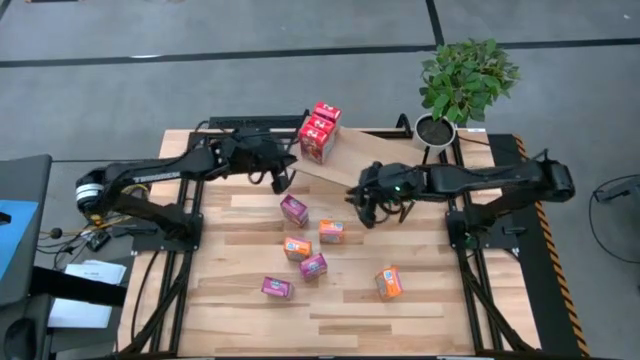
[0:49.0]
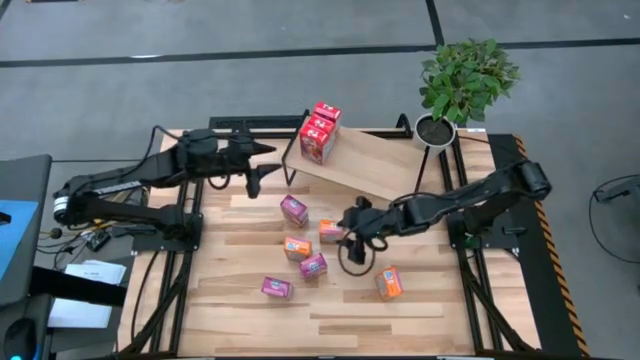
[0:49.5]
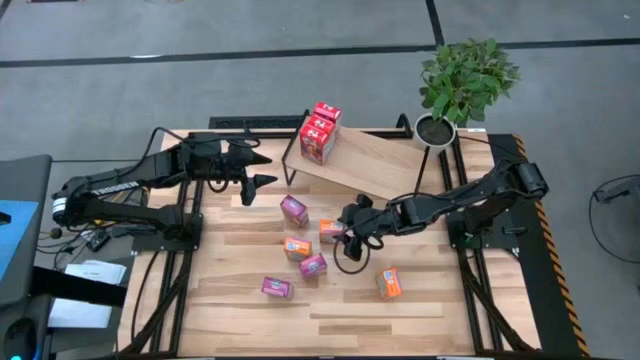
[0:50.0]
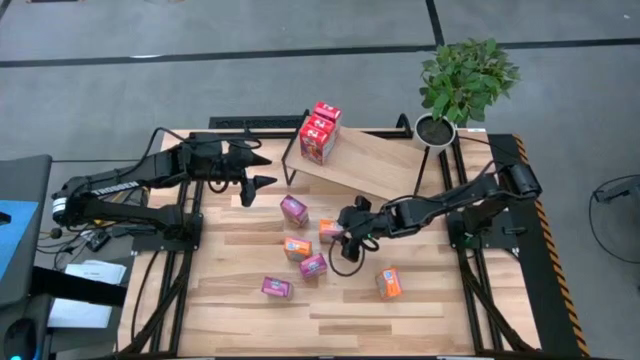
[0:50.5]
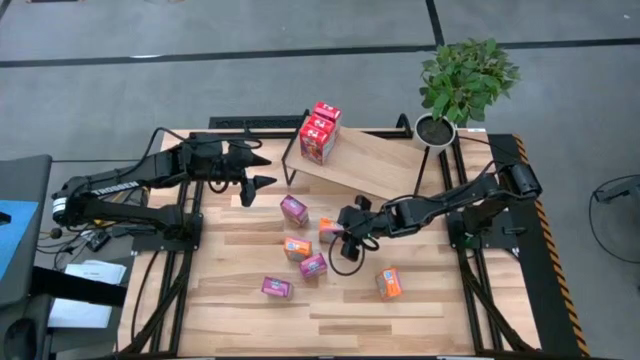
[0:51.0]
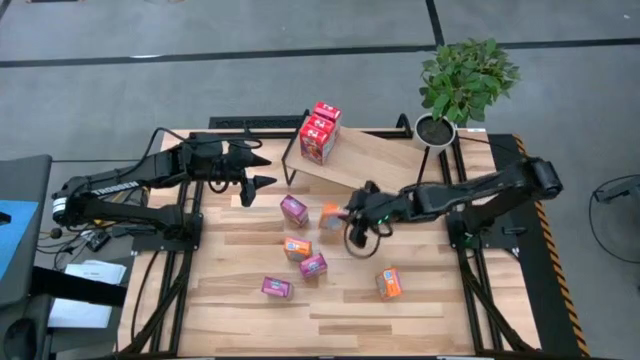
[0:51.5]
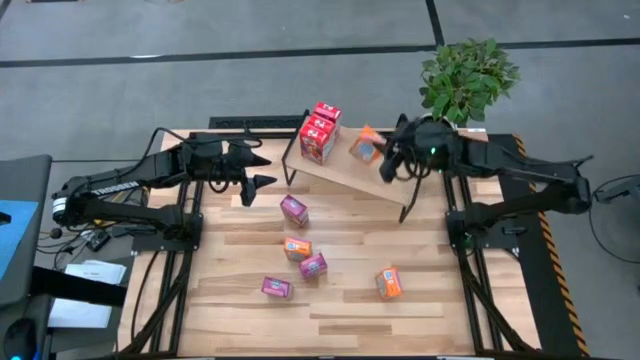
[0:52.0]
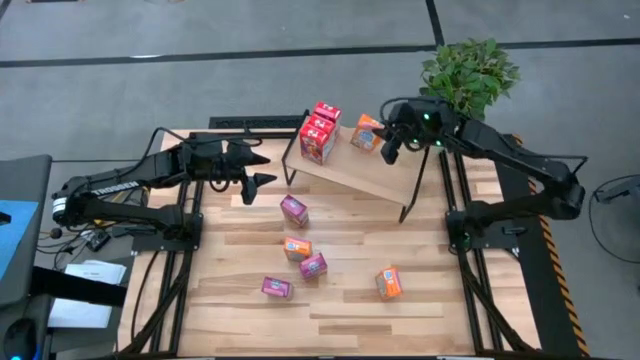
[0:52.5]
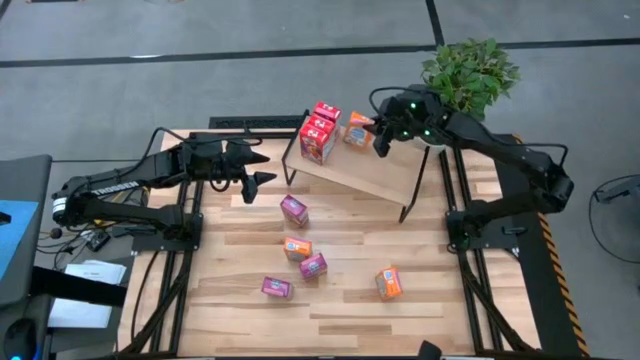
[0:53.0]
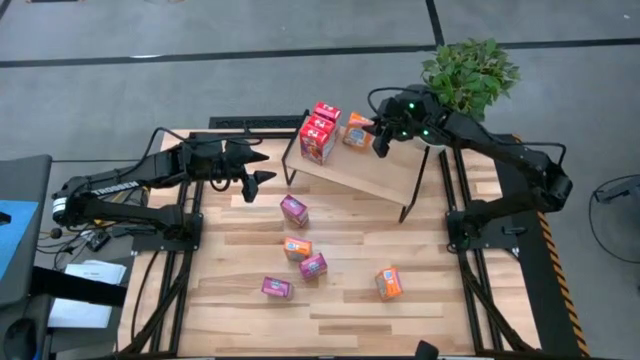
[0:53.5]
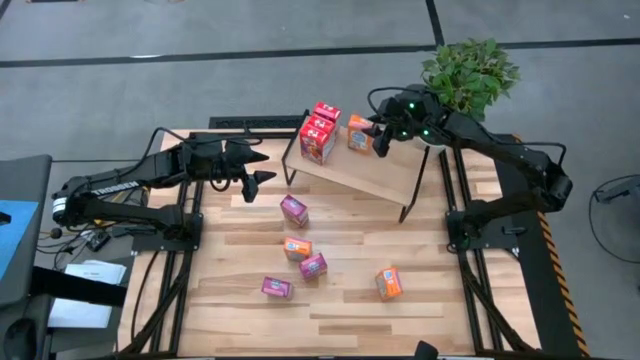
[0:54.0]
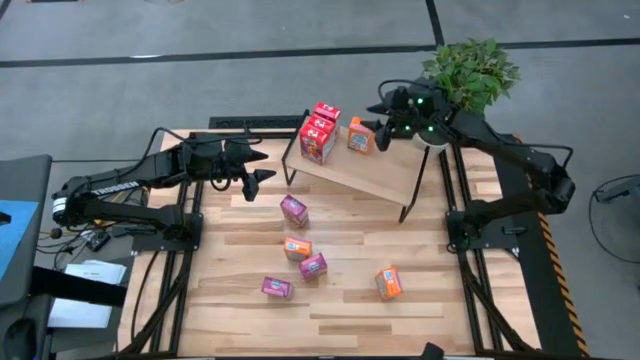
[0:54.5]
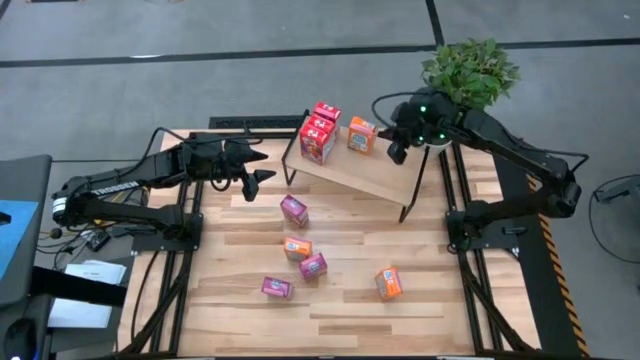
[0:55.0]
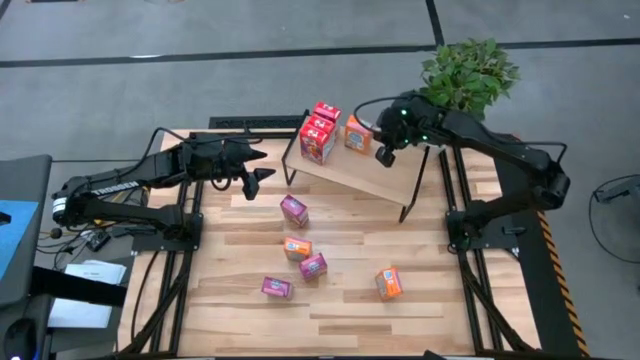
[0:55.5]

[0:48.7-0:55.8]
Task: Stack cereal on shelf
Put the top orange cereal box on the shelf

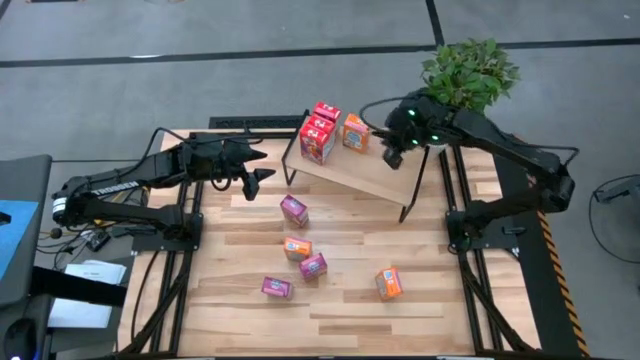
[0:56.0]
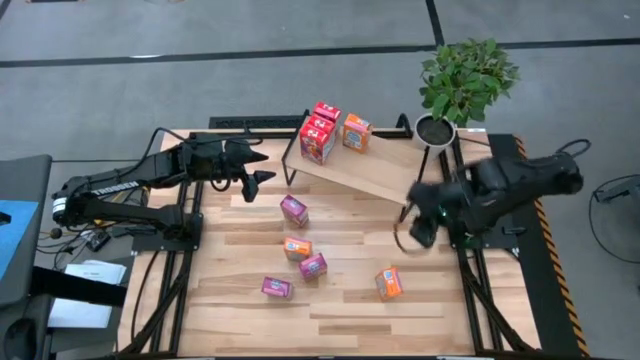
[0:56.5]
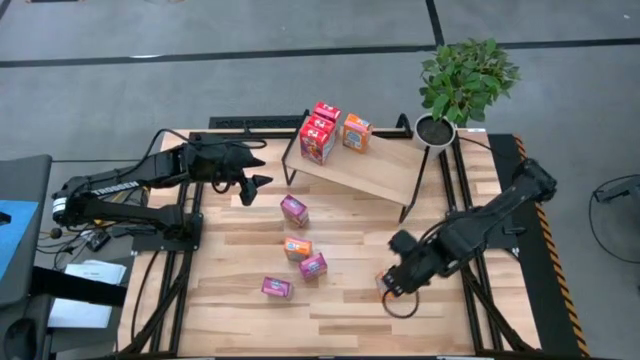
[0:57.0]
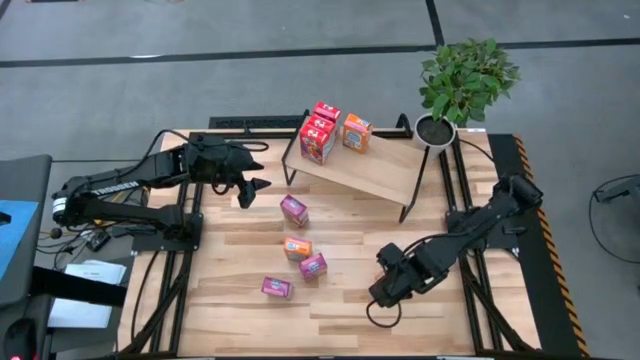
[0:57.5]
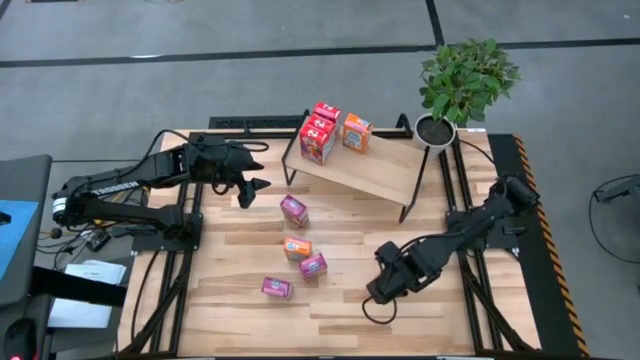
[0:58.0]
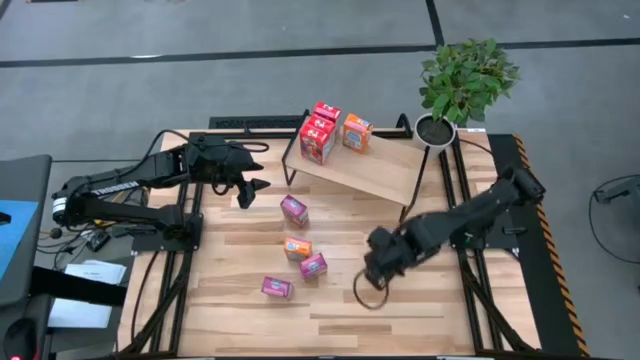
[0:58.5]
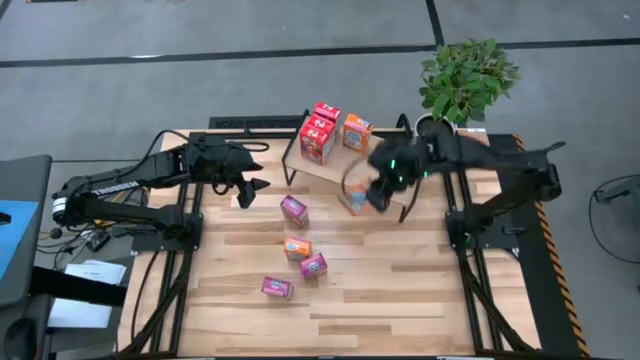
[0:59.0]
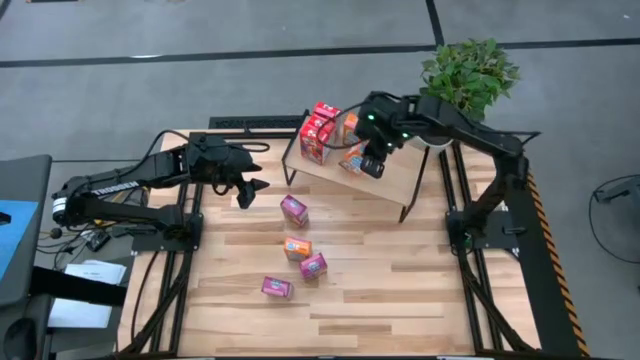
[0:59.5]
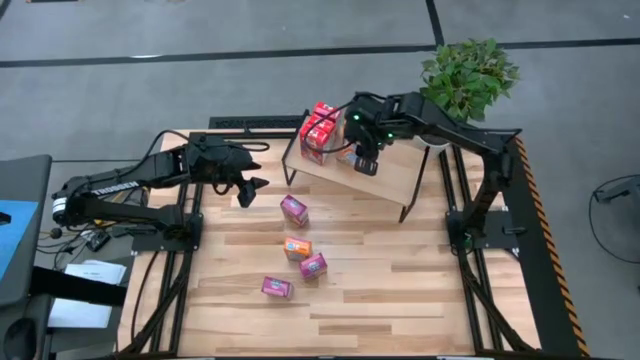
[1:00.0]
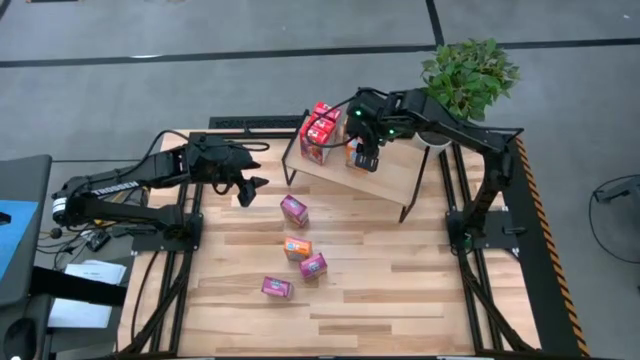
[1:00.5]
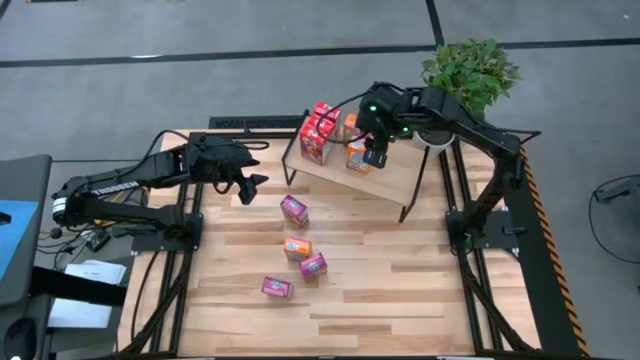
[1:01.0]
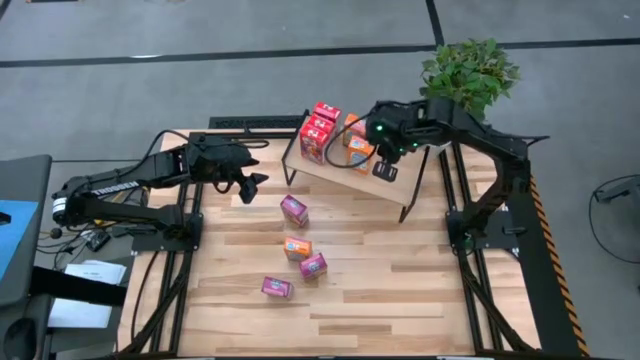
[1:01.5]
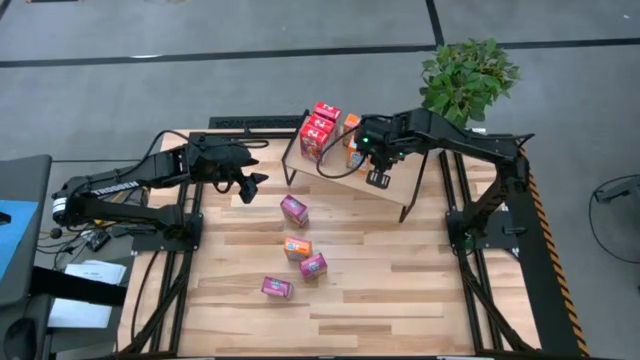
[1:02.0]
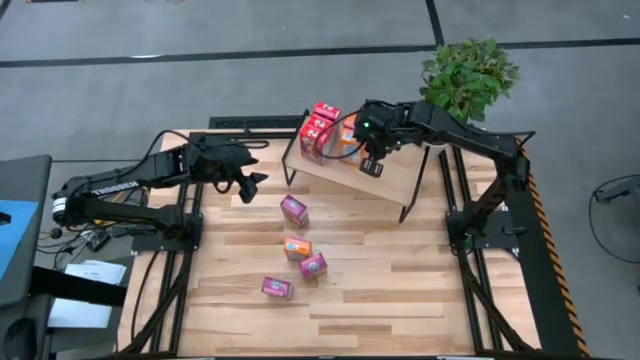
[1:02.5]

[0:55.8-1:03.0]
Put the right orange cereal box on the shelf aligned with the other orange cereal box

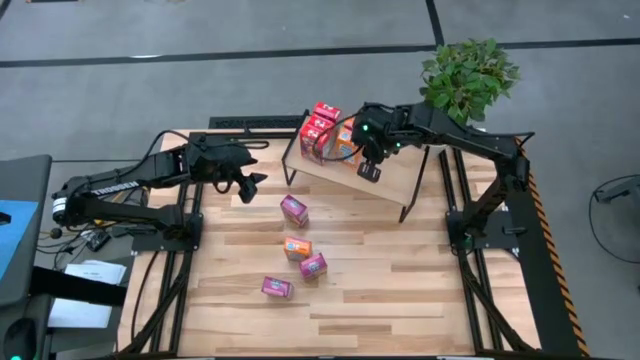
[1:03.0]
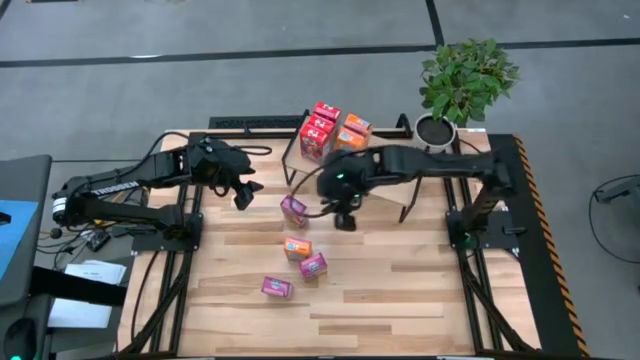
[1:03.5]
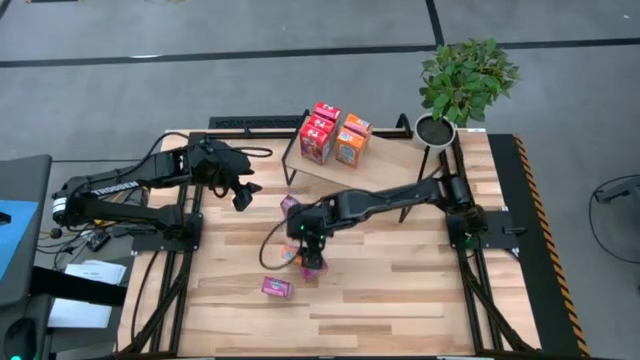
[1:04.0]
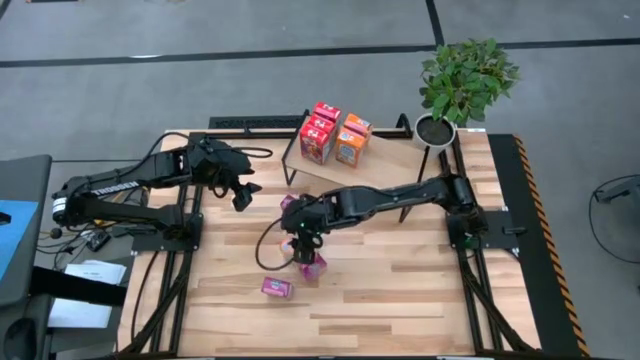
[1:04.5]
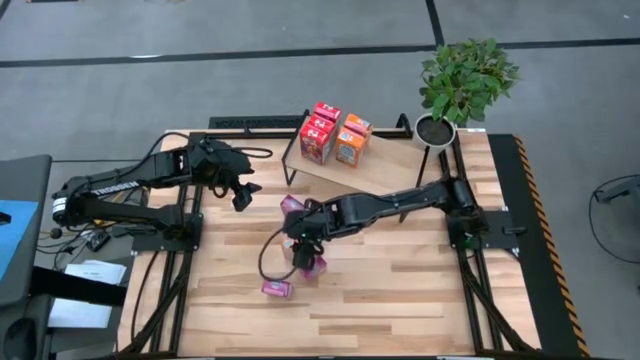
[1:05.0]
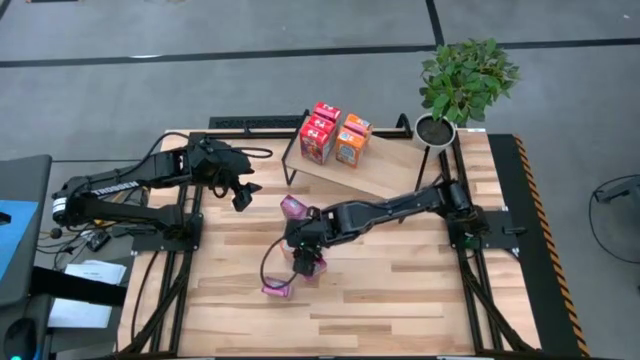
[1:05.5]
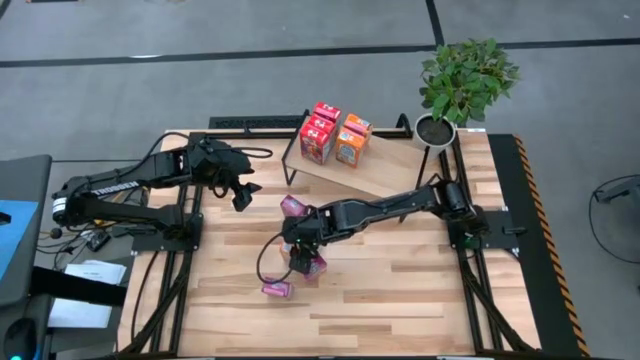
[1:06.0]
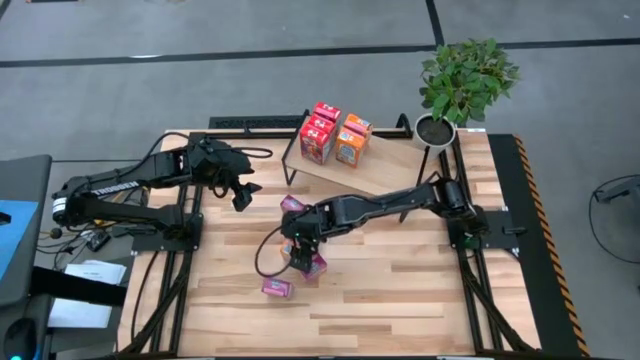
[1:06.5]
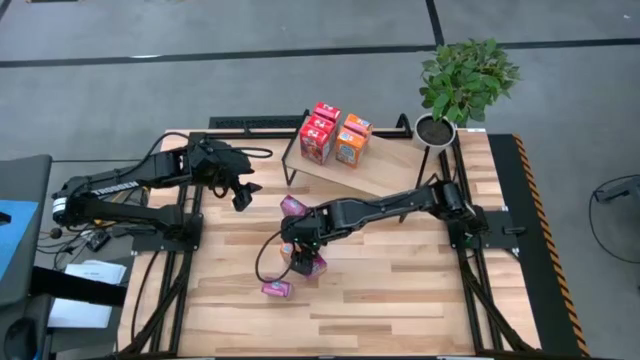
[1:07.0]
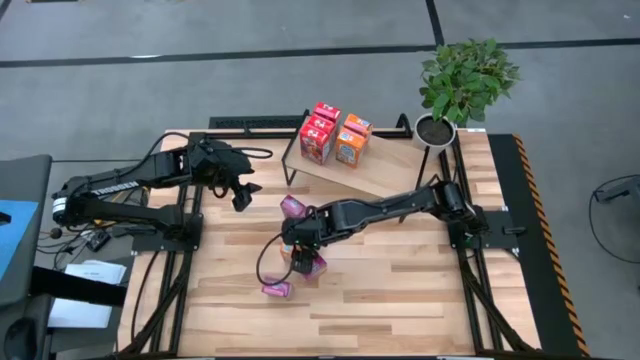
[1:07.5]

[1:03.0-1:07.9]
Put the orange cereal box on the shelf aligned with the other orange cereal boxes

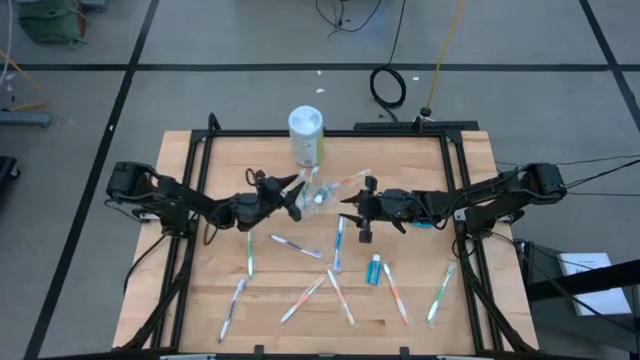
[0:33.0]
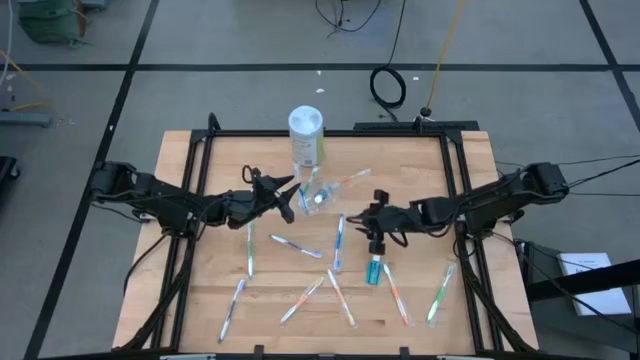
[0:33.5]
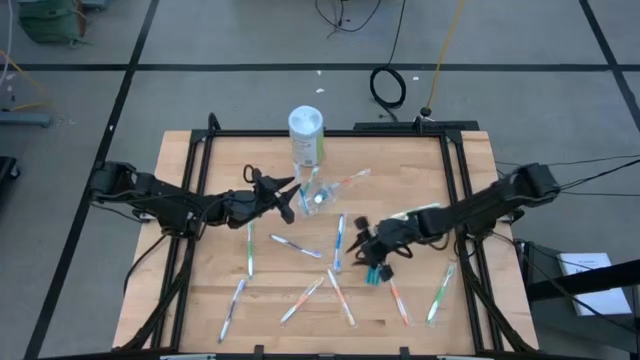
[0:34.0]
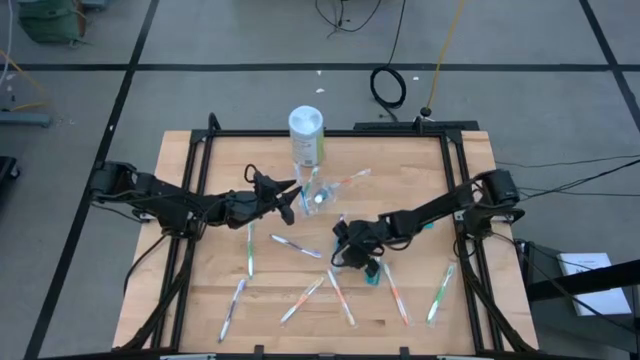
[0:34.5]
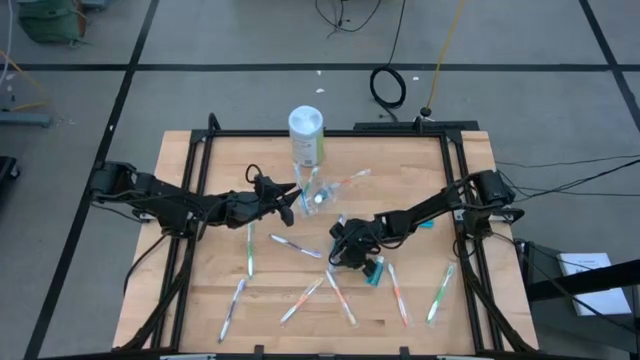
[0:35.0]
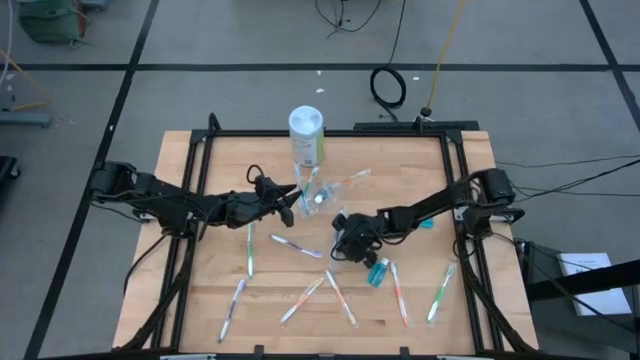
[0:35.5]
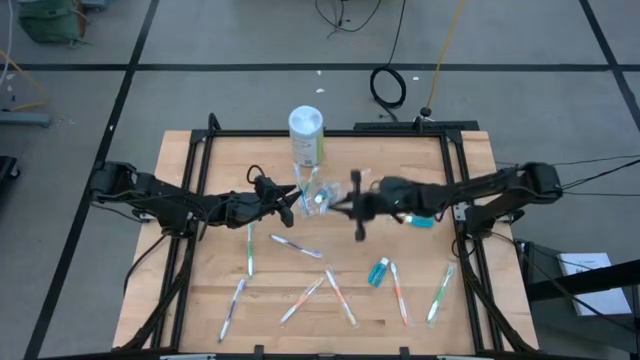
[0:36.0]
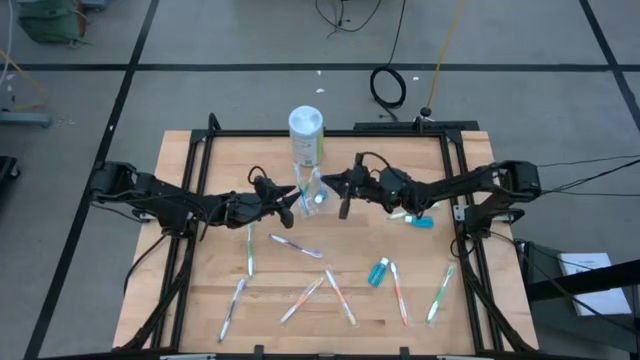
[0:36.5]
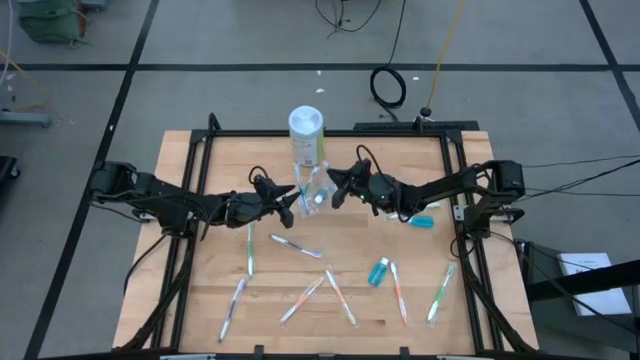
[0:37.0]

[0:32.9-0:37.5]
Task: Pick & Place toothbrushing station
Put the blue toothbrush into the transparent organizer
